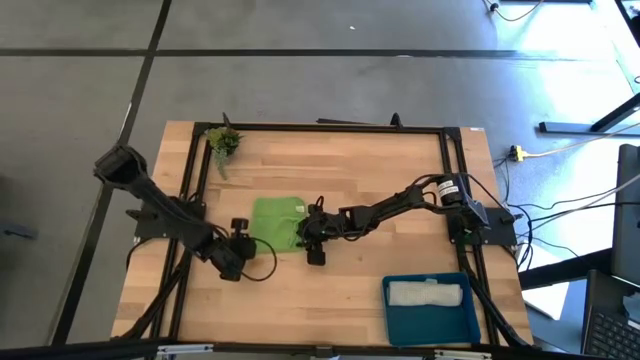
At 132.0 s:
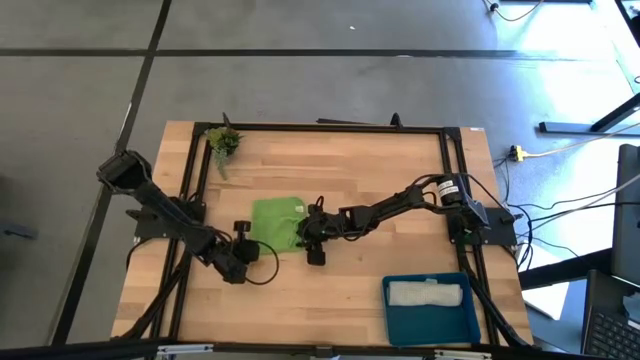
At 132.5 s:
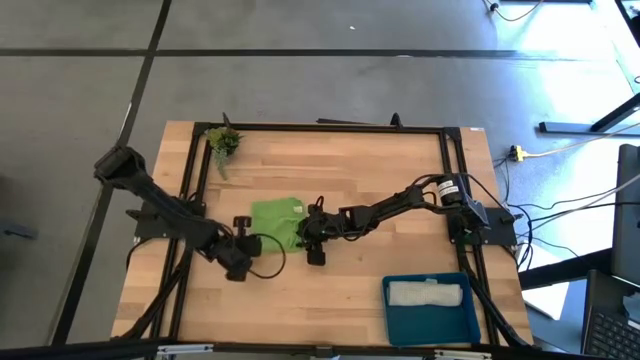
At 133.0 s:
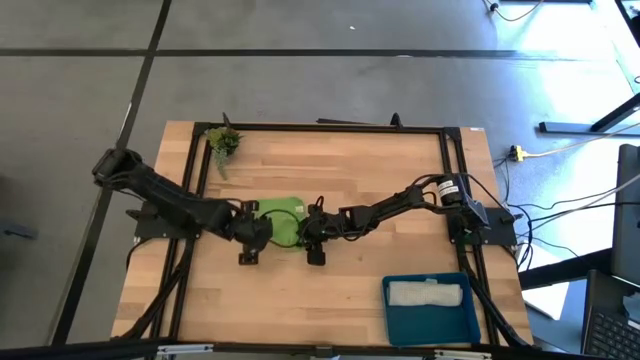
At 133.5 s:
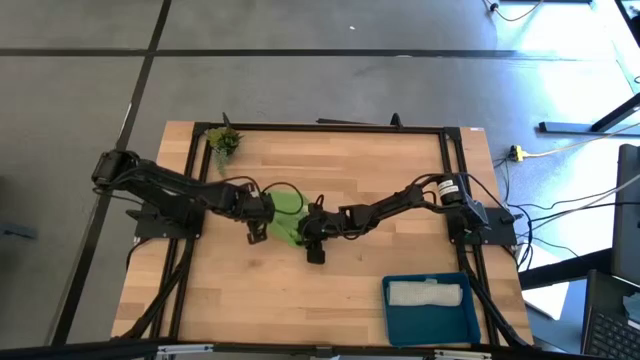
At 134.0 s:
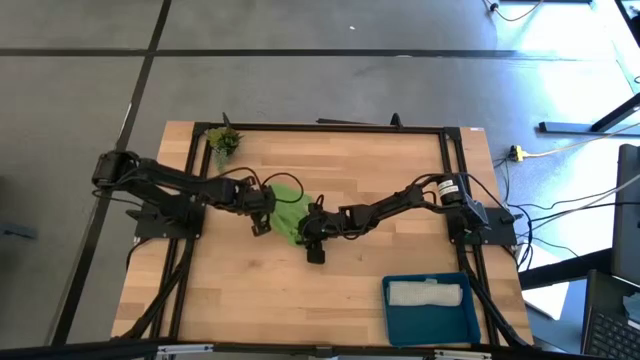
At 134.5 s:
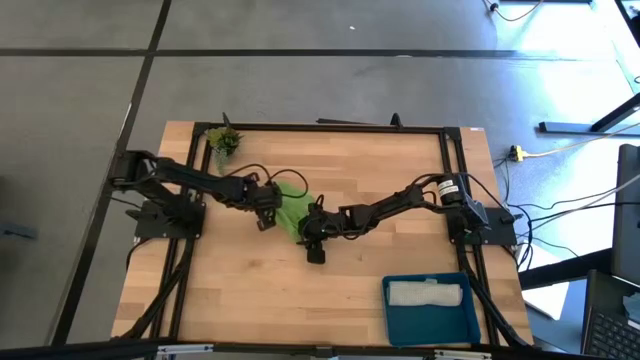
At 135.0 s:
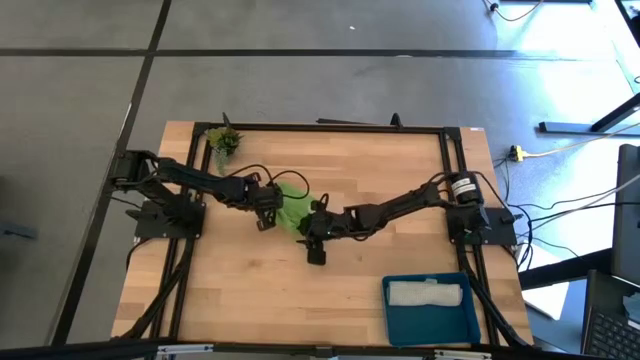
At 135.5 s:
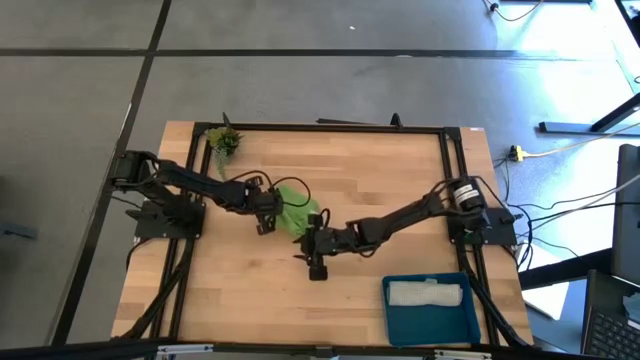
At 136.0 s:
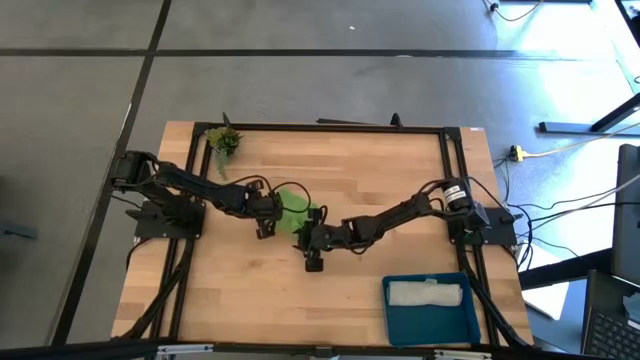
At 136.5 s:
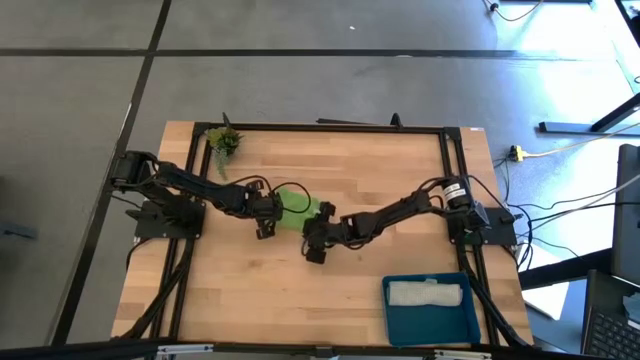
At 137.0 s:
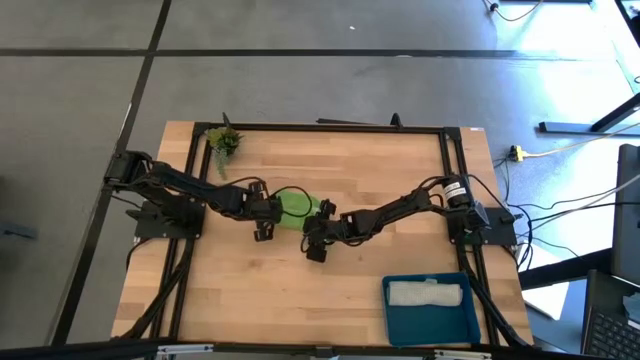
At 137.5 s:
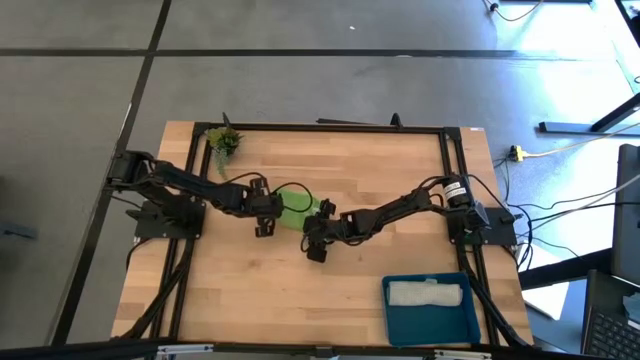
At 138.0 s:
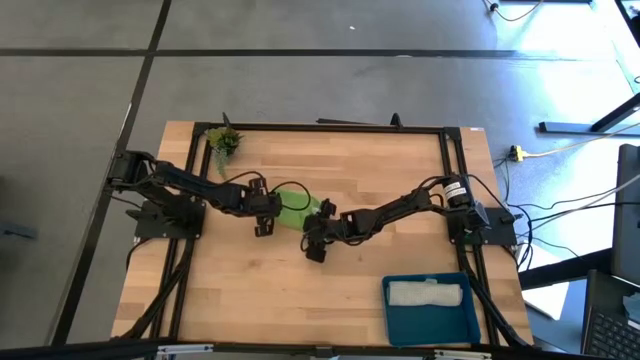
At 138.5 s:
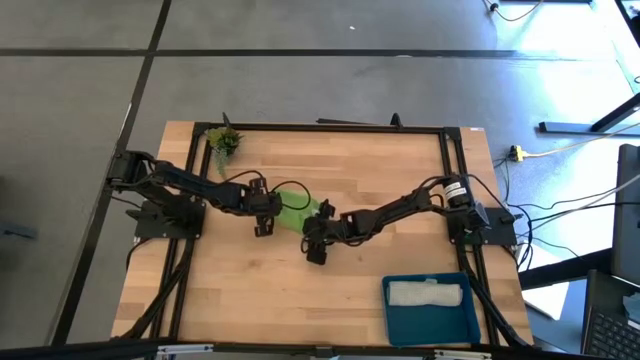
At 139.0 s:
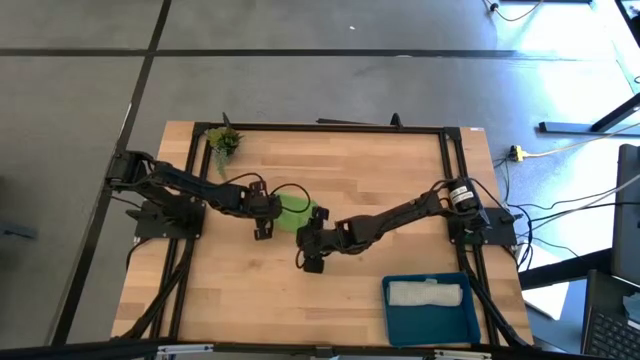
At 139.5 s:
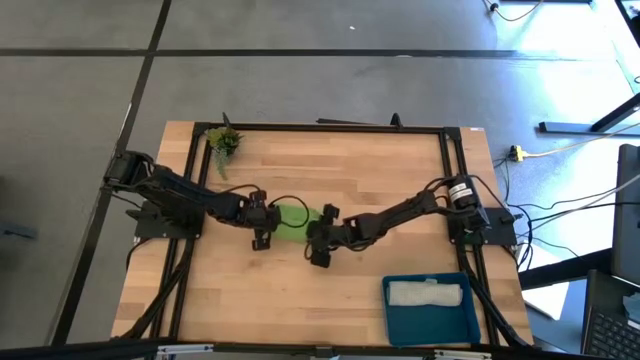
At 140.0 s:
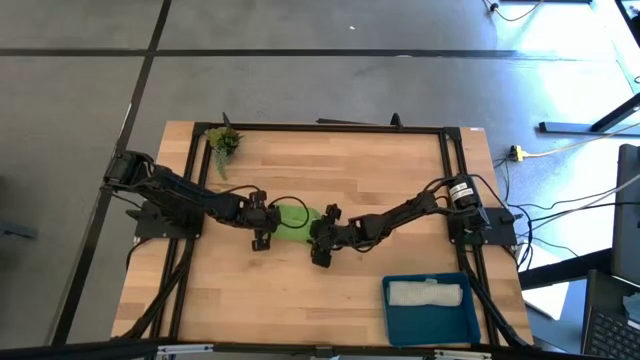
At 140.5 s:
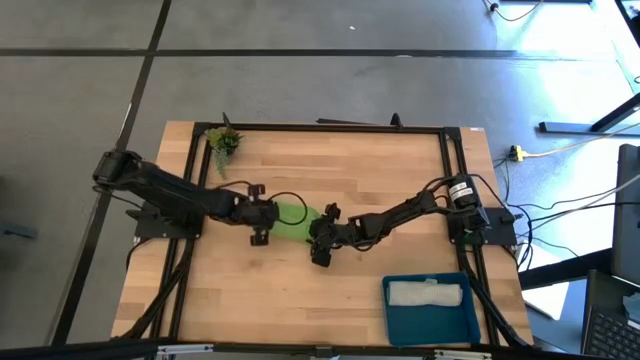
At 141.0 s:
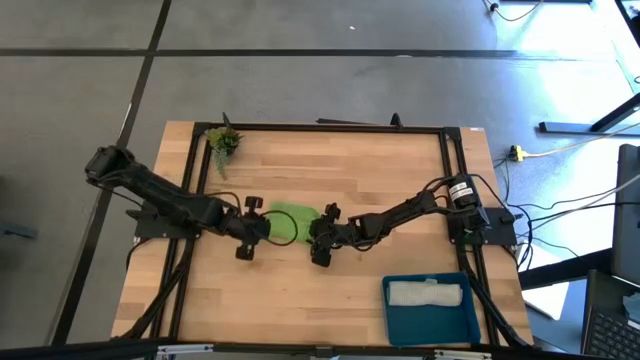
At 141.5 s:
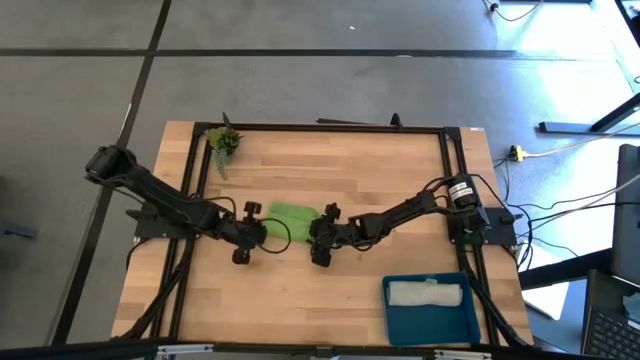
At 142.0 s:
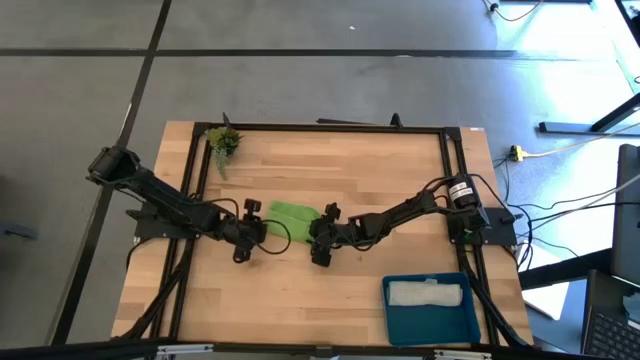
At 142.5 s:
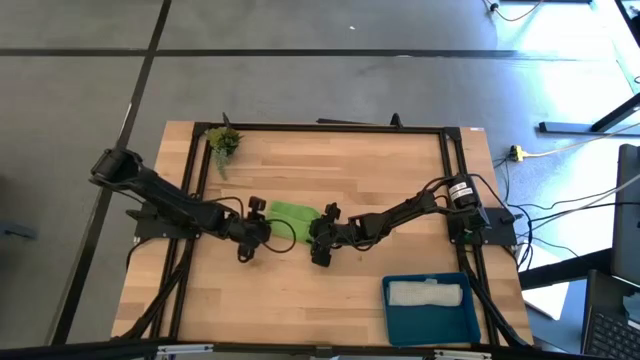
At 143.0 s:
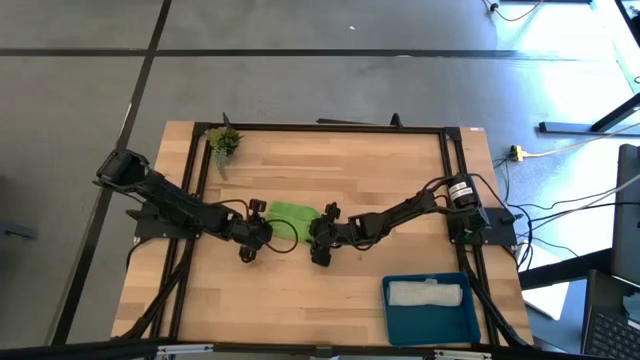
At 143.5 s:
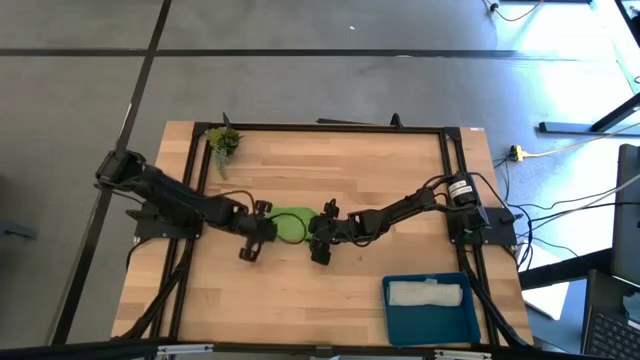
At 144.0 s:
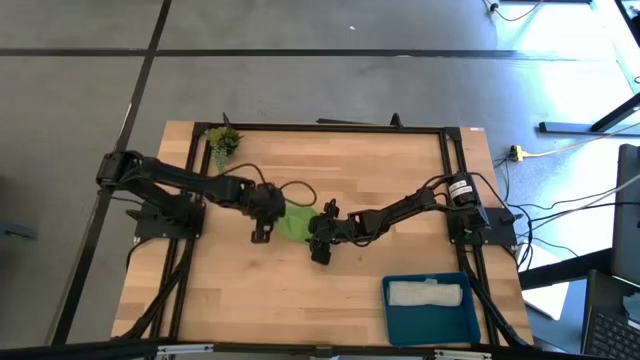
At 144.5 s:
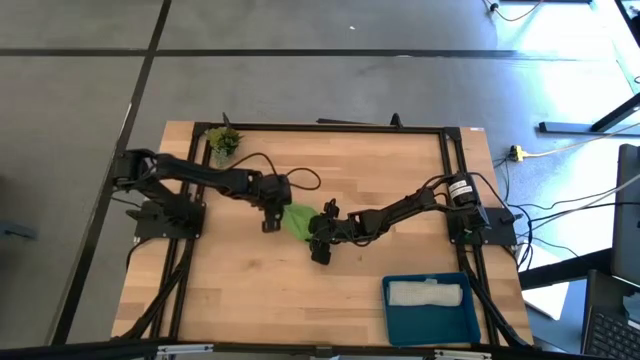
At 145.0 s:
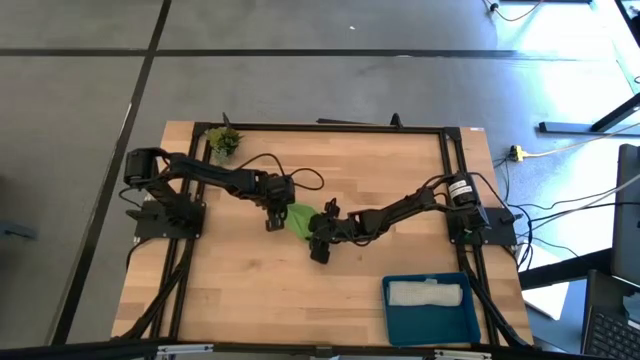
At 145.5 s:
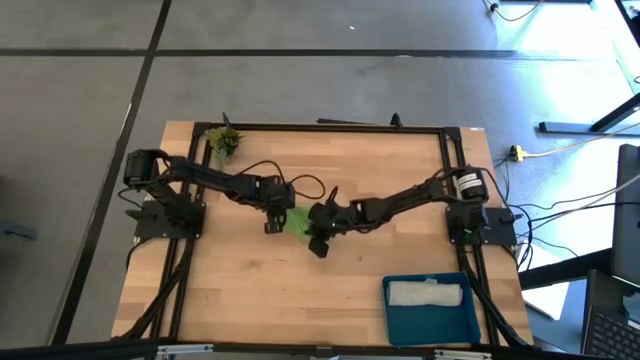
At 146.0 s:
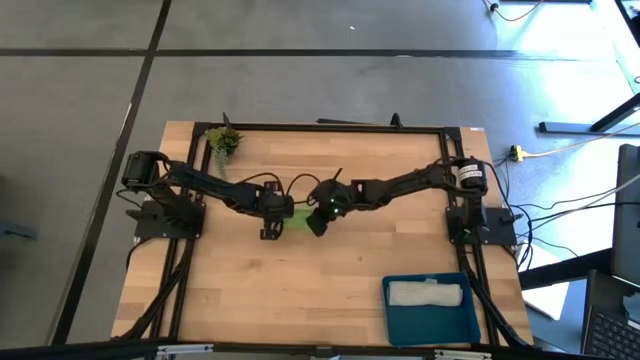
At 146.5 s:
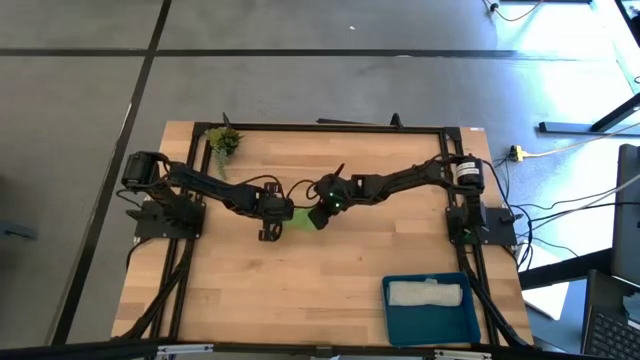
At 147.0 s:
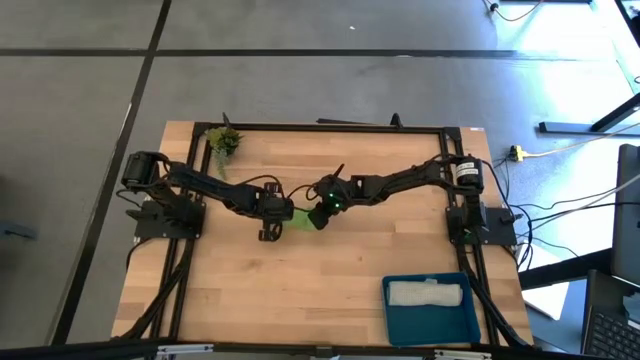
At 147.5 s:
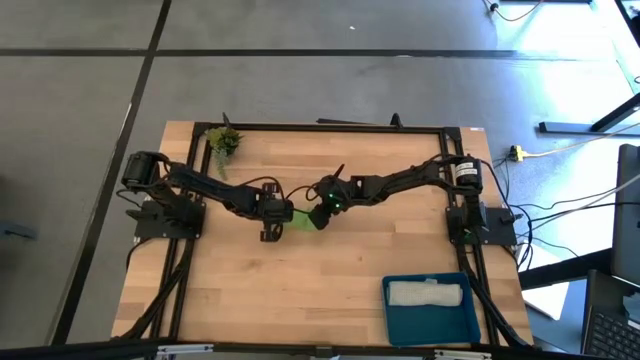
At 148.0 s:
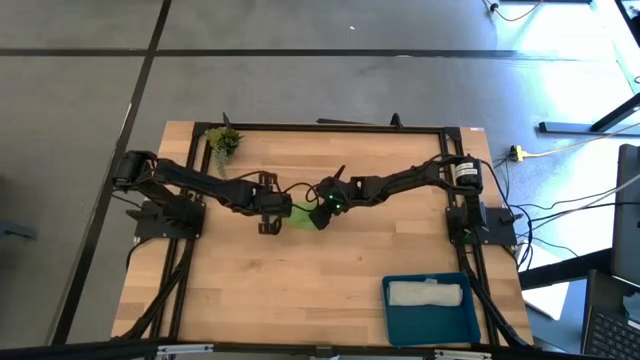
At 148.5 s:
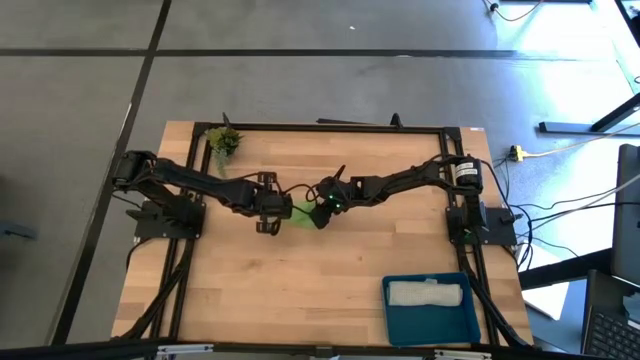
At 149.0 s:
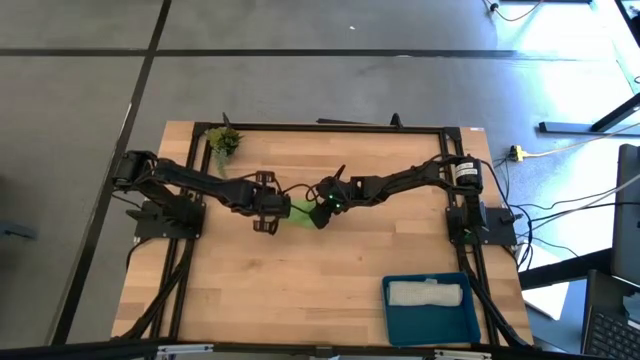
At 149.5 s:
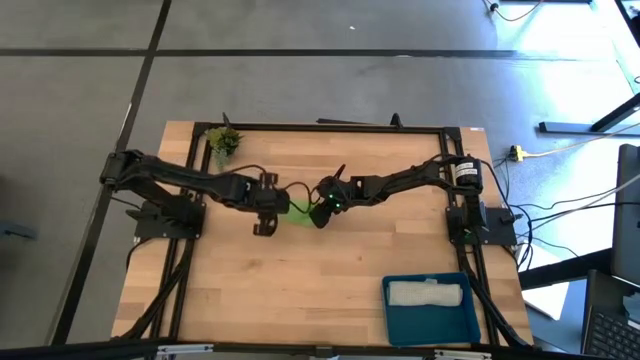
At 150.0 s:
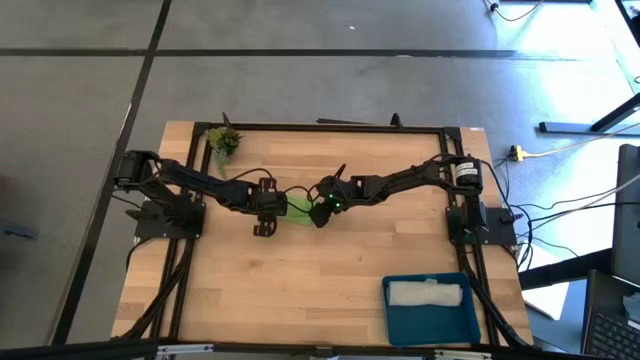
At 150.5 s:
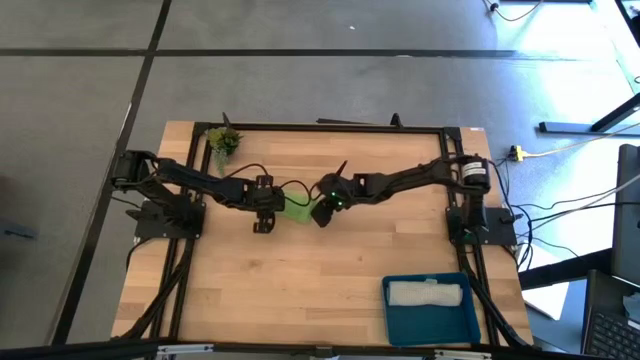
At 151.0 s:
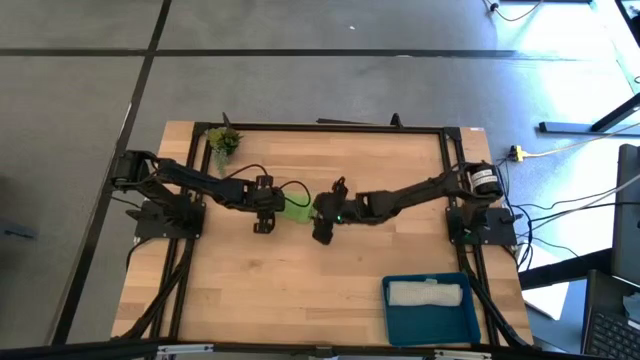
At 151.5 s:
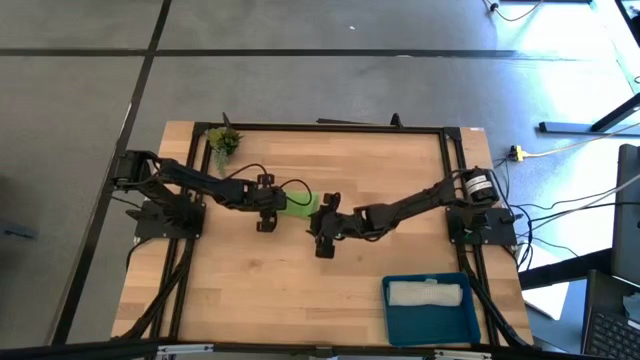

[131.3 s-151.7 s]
Task: Roll microfiber towels into tight, uniform cylinder then place into a basket
Roll the green towel
